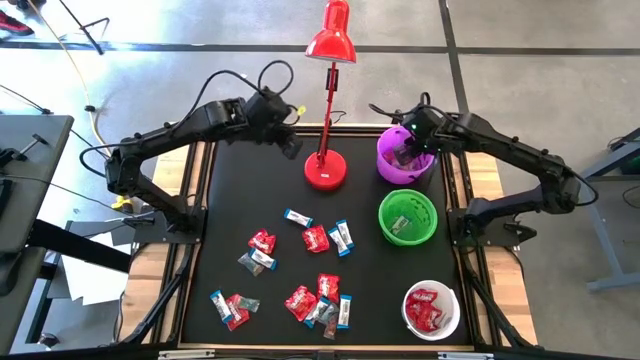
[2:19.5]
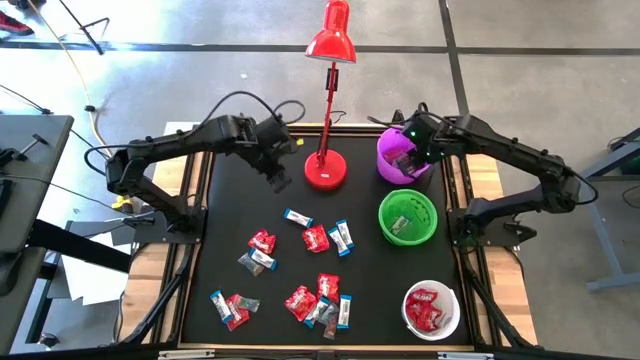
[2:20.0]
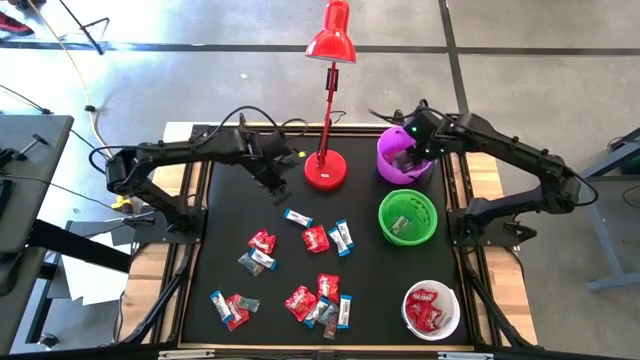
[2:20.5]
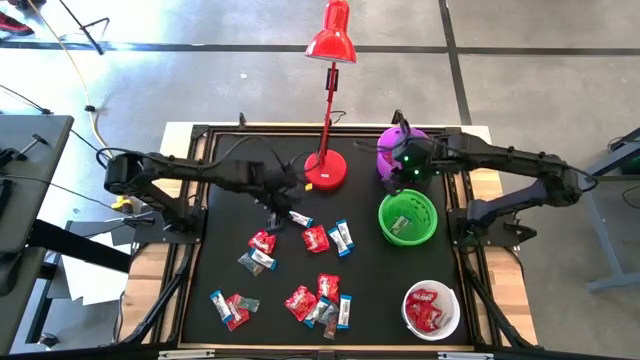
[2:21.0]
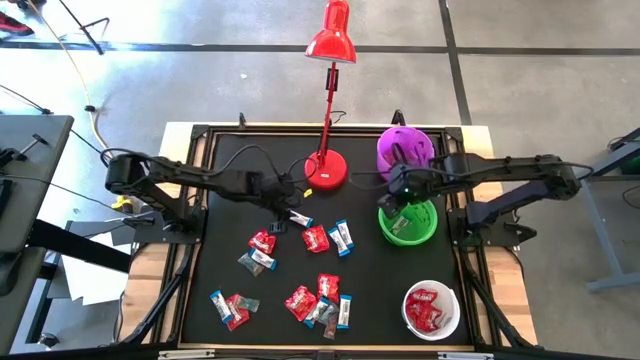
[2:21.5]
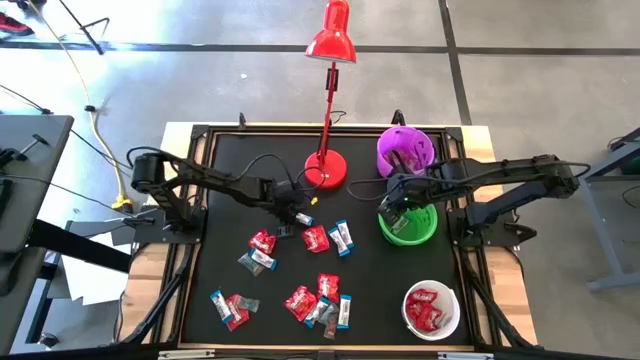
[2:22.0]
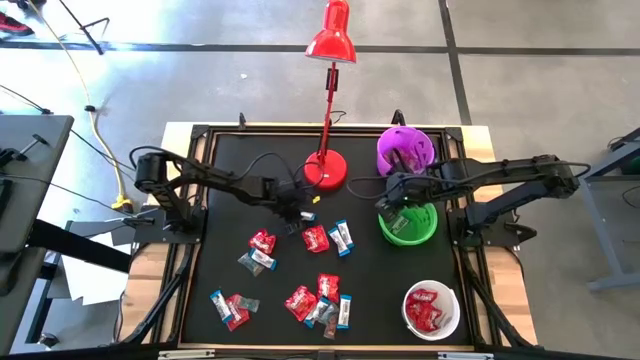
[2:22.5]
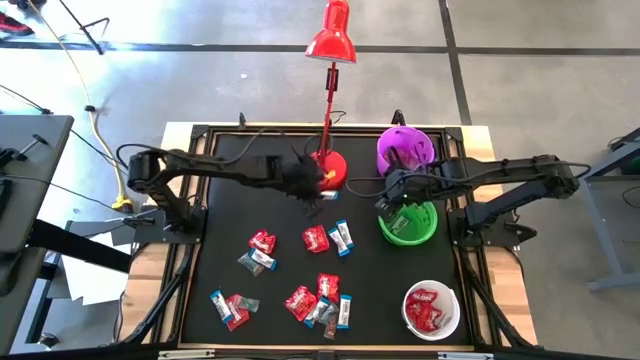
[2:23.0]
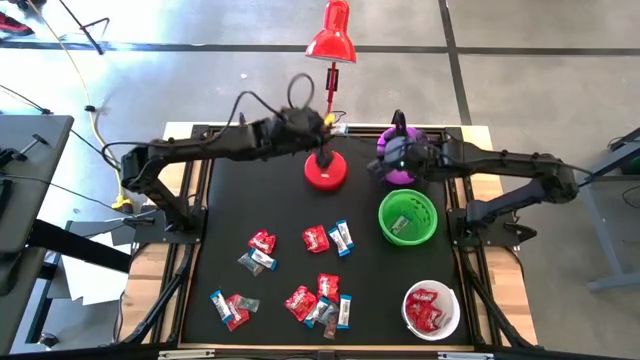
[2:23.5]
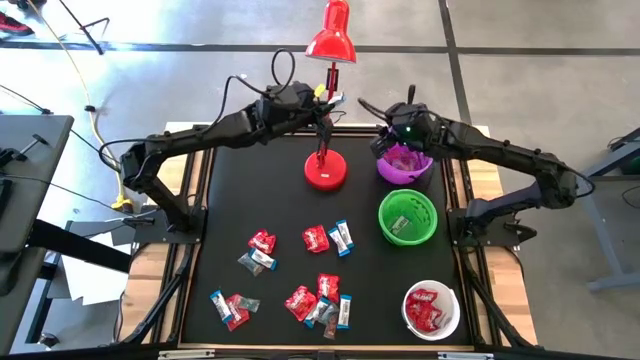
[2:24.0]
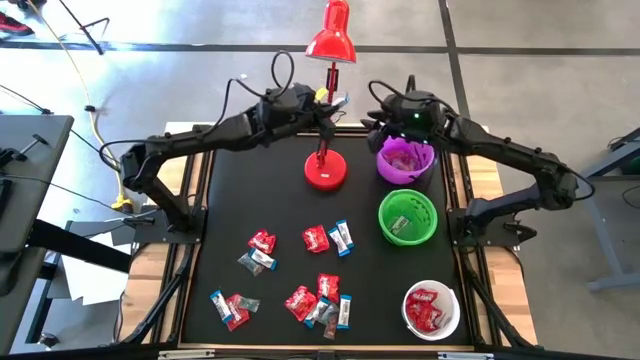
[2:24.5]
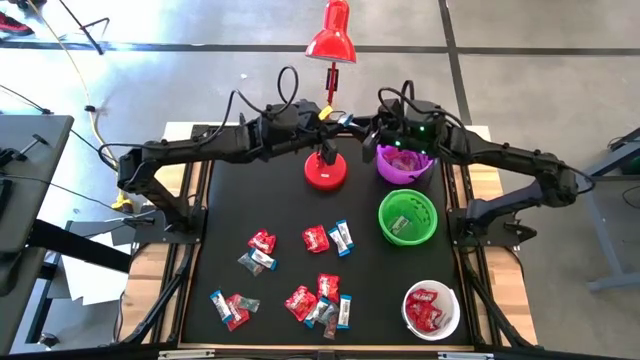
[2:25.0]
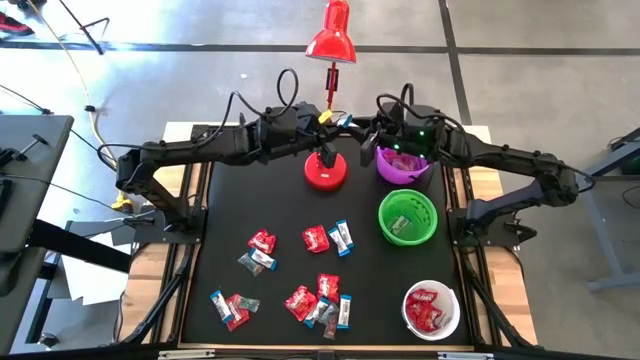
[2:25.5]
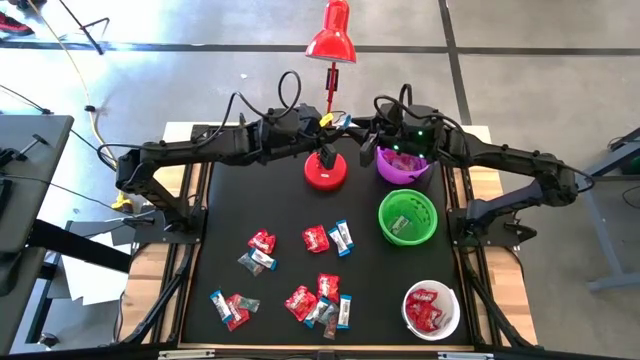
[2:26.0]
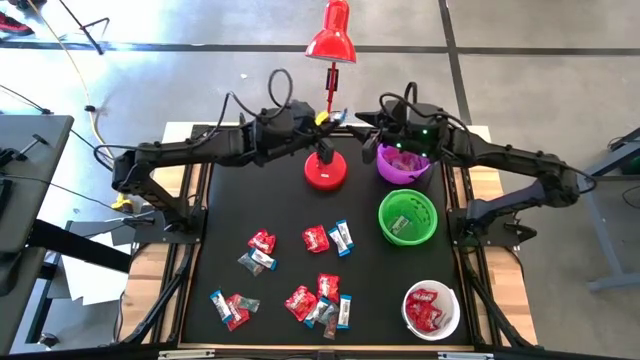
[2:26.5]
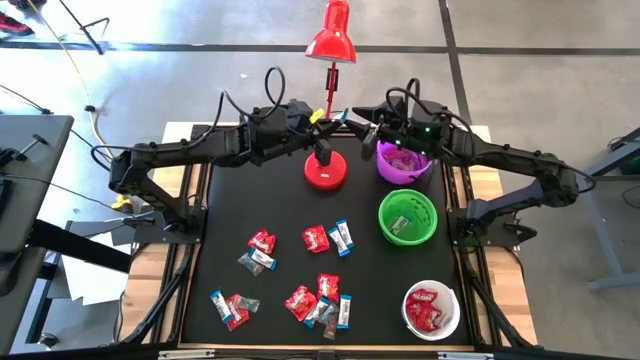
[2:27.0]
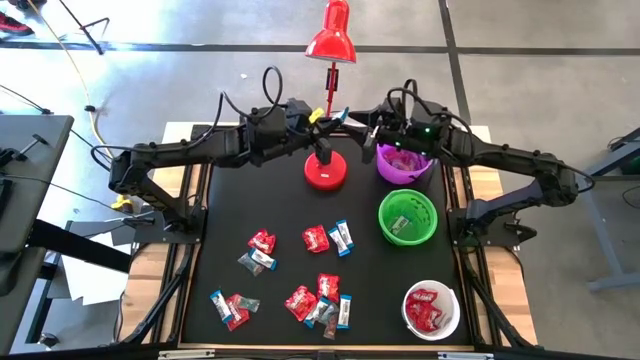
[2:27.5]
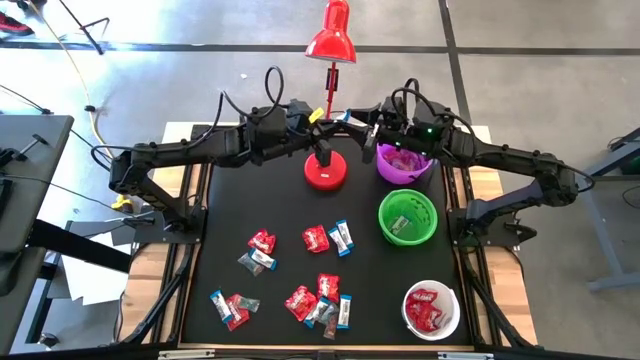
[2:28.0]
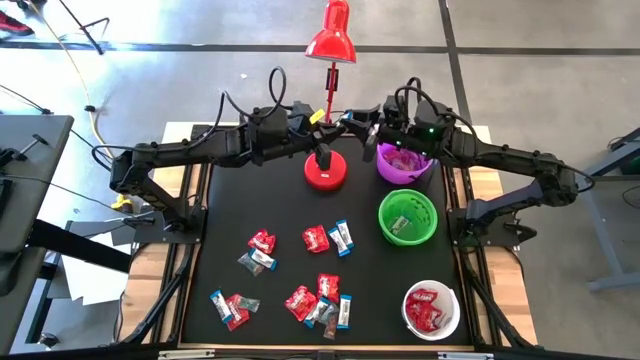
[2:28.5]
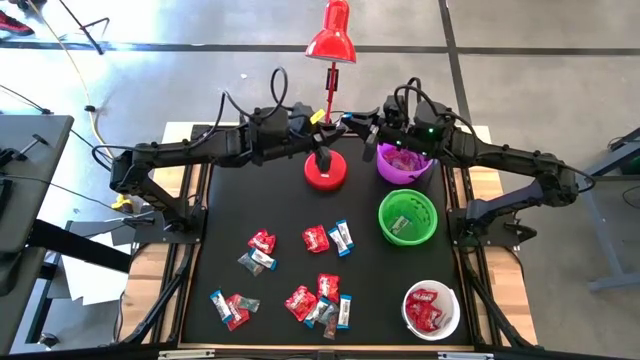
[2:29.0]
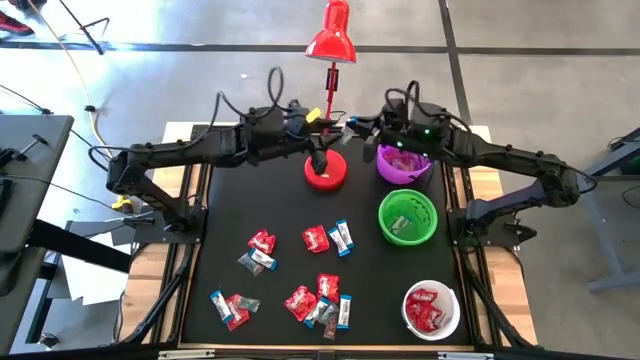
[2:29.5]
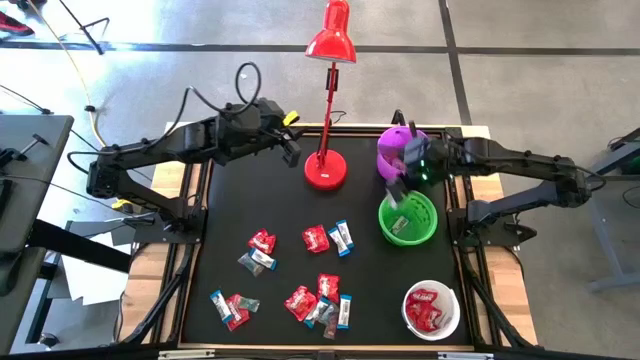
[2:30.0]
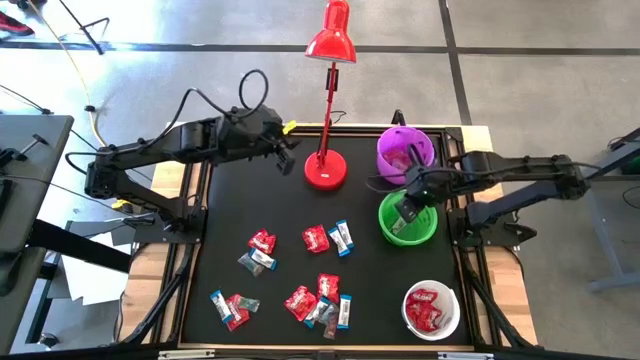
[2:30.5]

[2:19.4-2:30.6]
Task: Organize candy in baskets
Put the white chocolate bar into the green bucket

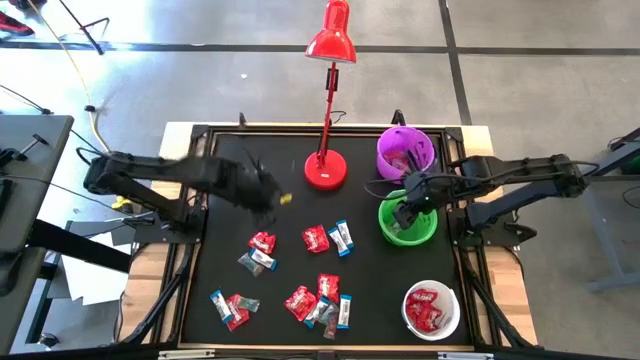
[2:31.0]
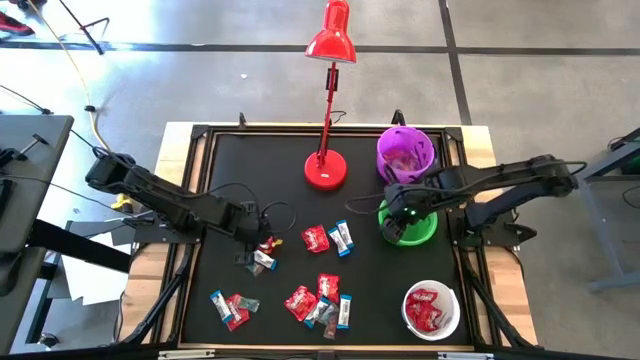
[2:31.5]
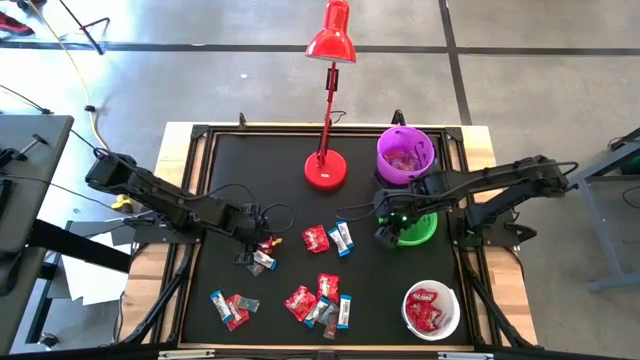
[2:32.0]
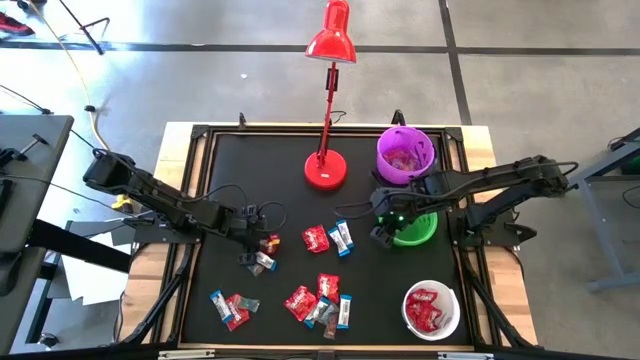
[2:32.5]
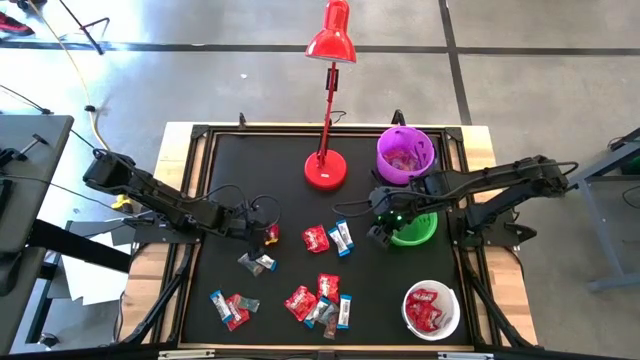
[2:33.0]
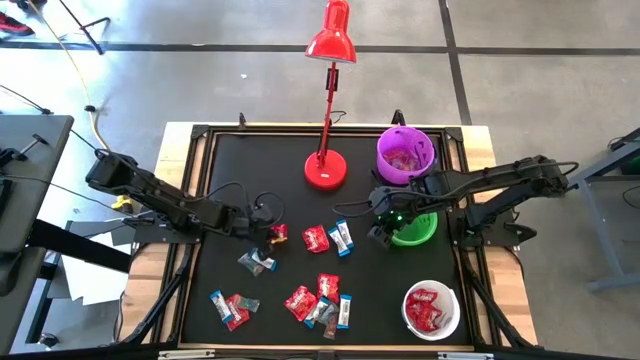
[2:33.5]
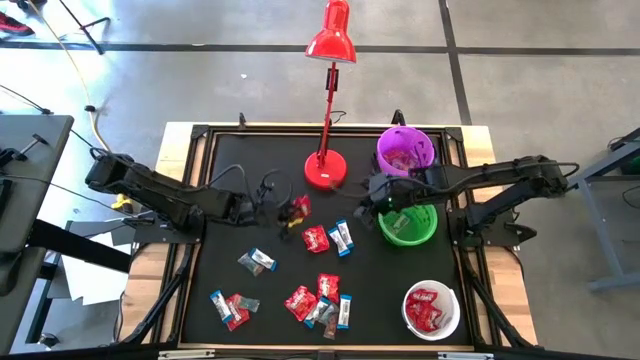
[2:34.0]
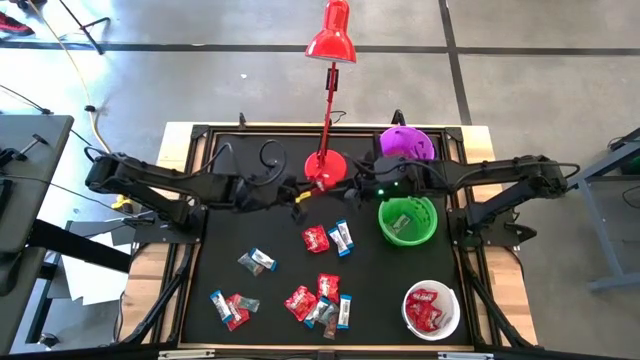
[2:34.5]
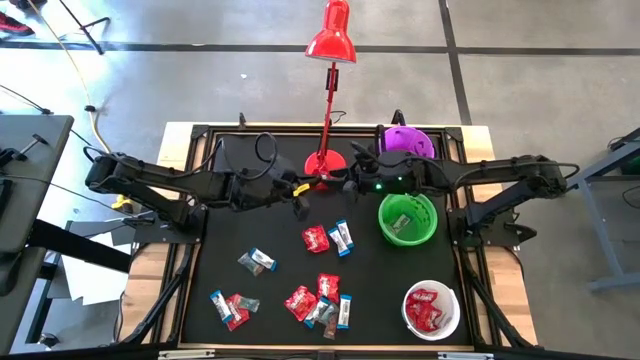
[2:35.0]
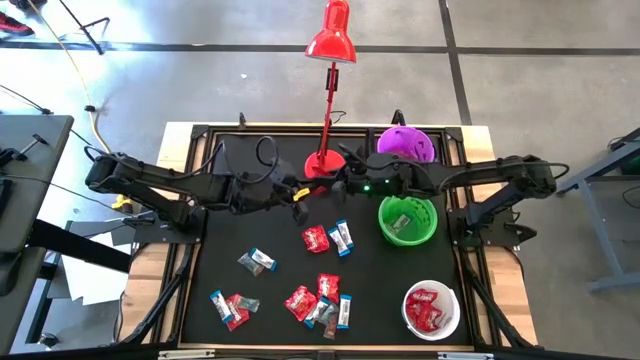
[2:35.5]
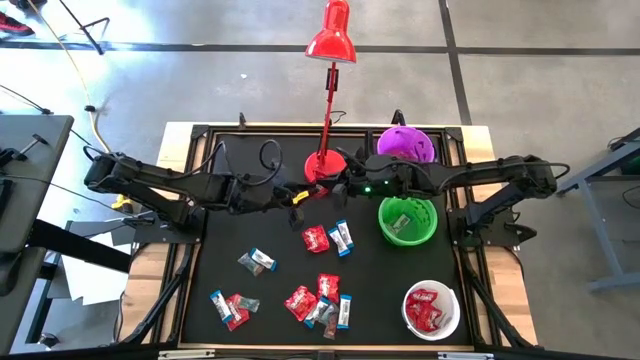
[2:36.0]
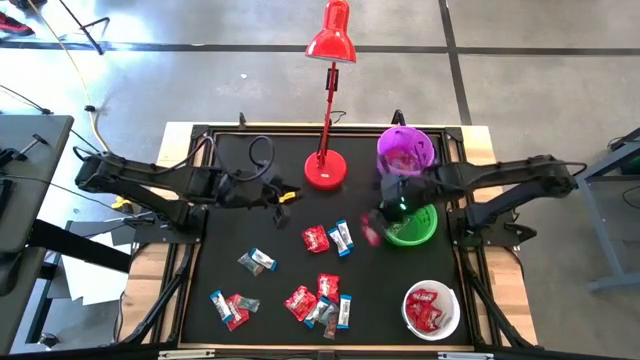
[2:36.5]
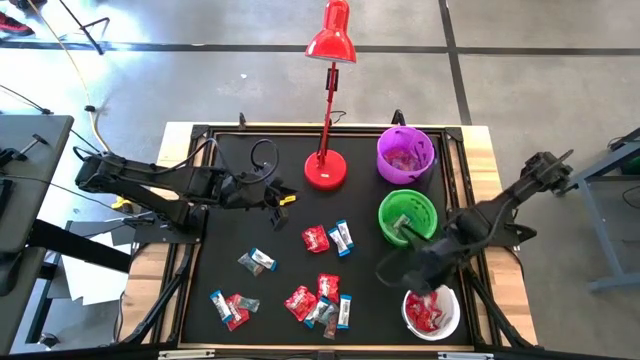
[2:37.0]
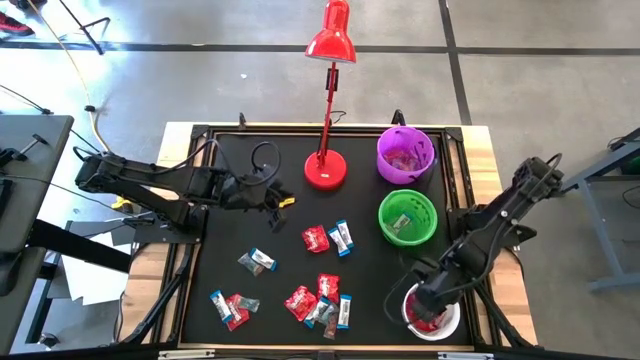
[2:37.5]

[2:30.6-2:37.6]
Put the red candy into the white bucket

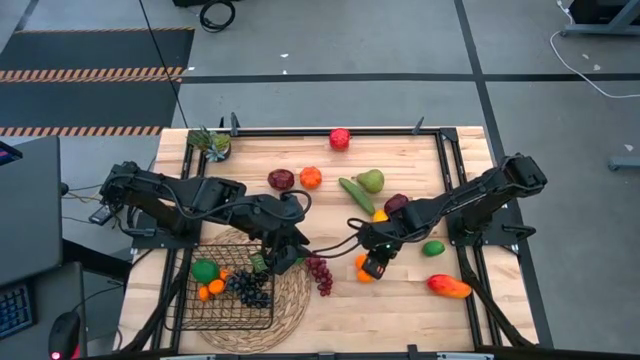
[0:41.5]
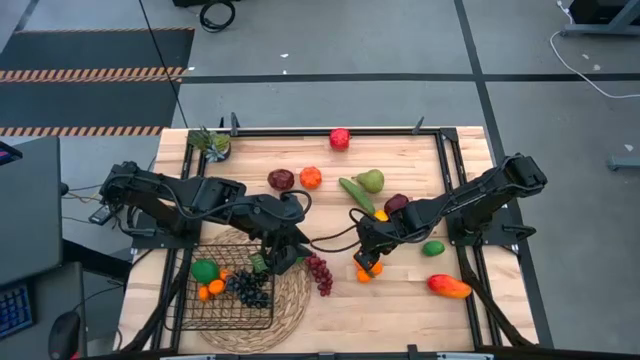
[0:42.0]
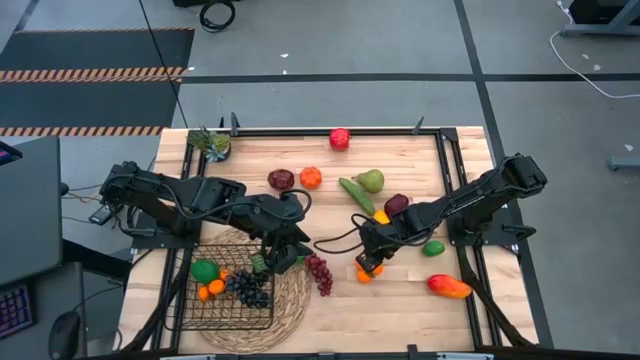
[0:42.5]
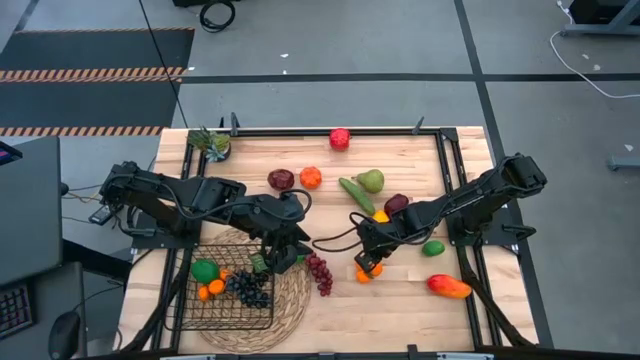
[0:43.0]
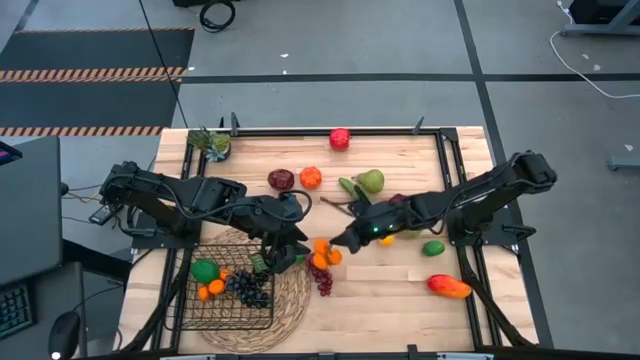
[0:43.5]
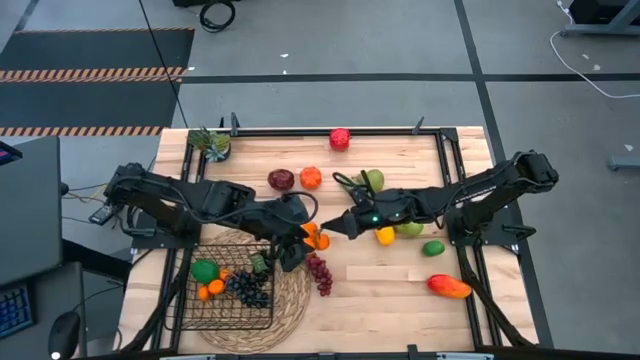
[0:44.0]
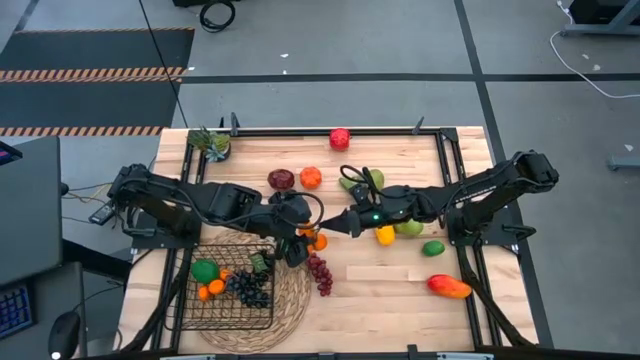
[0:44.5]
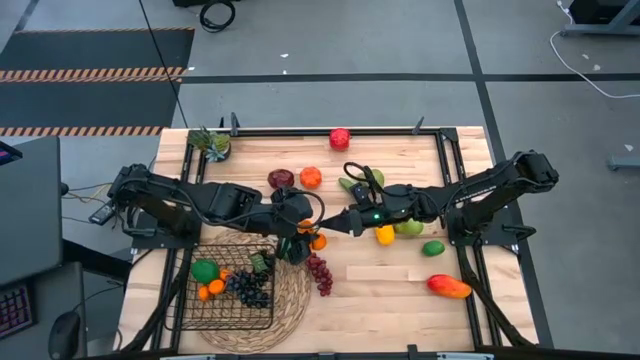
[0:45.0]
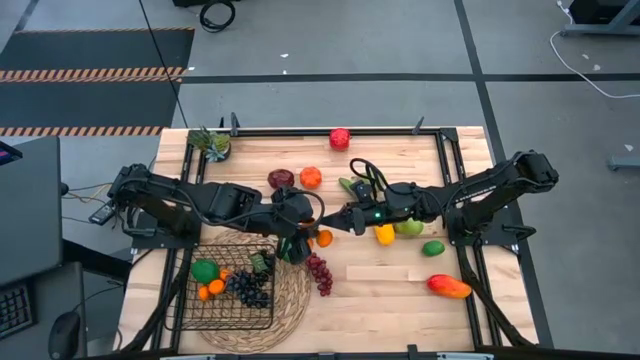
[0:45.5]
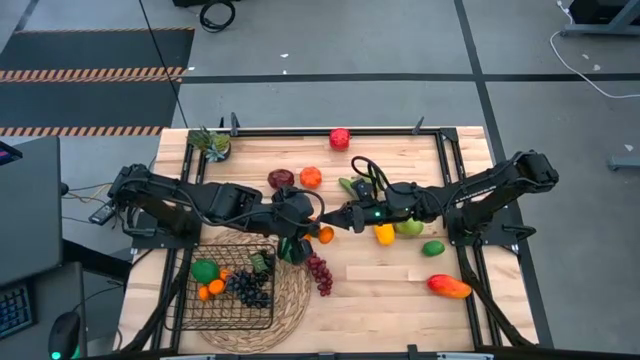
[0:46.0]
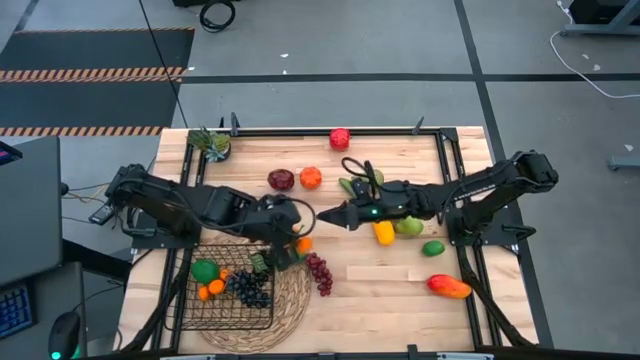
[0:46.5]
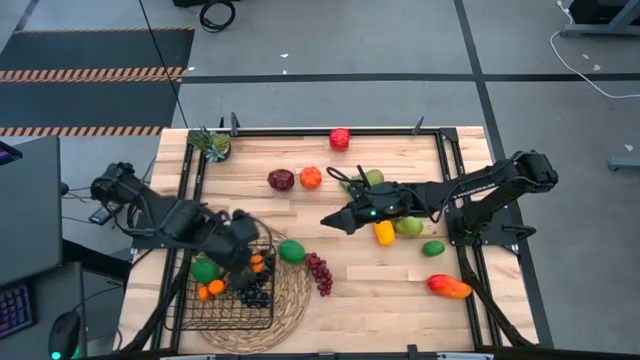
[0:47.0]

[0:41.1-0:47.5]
Task: Build produce basket
Put the tangerine into the black wire basket
